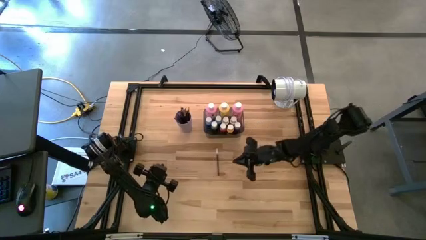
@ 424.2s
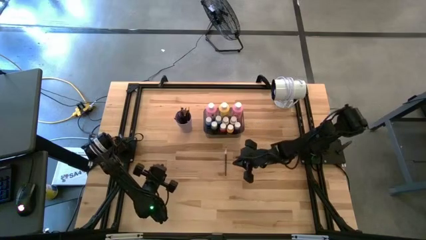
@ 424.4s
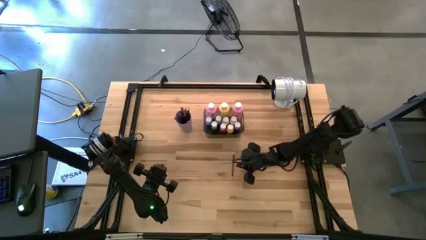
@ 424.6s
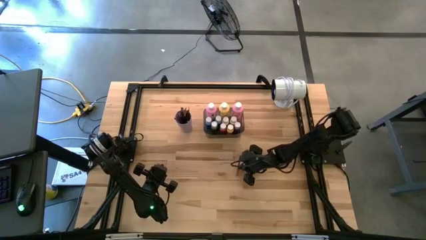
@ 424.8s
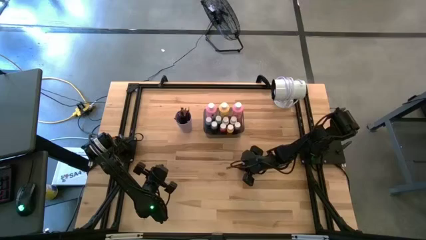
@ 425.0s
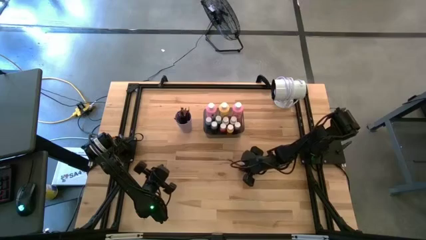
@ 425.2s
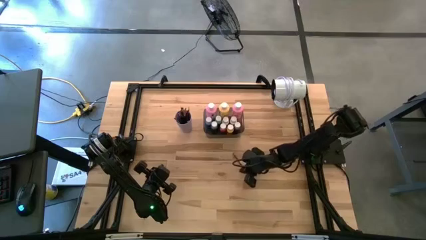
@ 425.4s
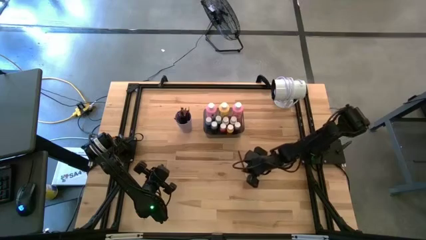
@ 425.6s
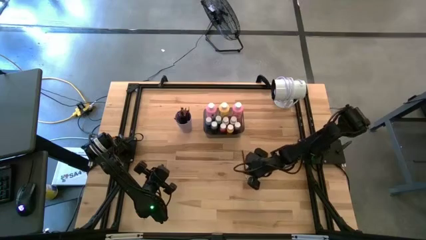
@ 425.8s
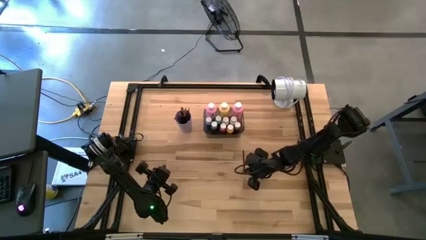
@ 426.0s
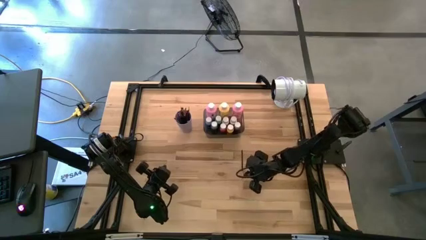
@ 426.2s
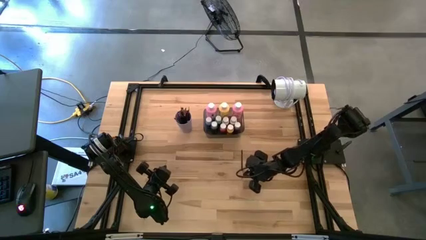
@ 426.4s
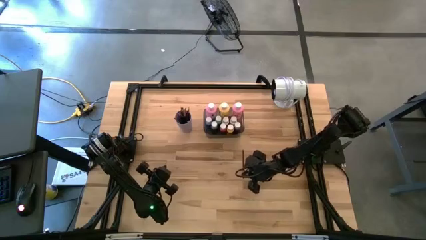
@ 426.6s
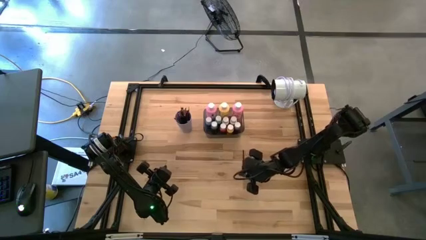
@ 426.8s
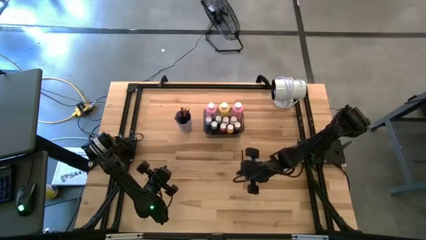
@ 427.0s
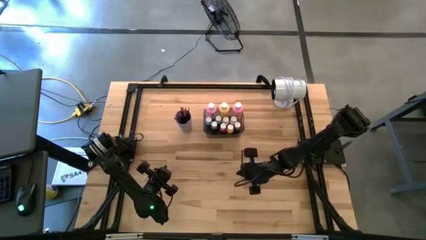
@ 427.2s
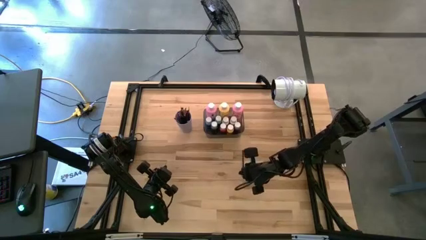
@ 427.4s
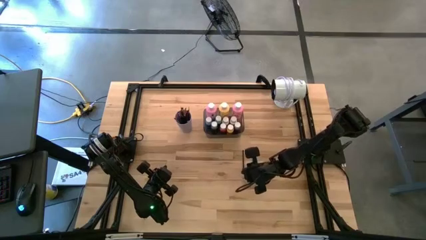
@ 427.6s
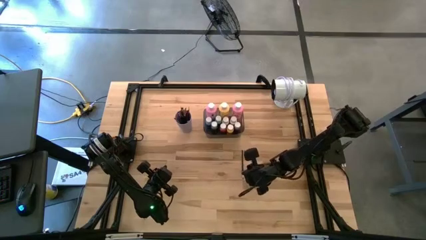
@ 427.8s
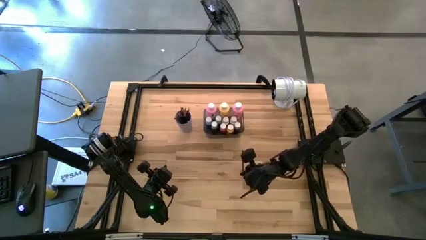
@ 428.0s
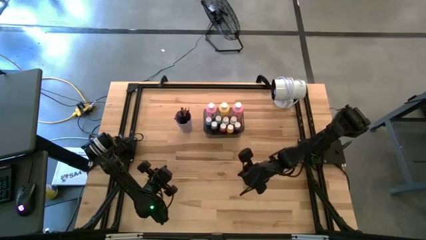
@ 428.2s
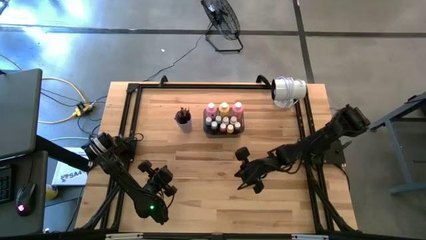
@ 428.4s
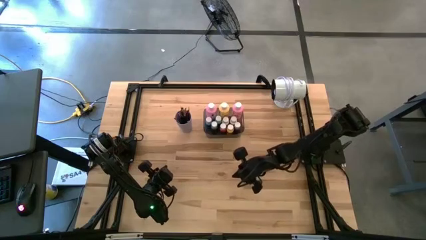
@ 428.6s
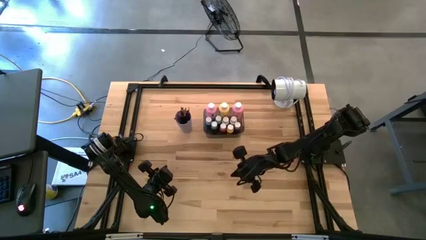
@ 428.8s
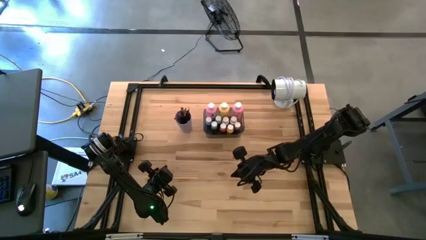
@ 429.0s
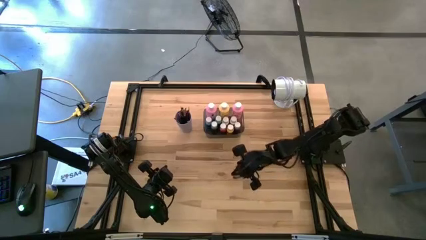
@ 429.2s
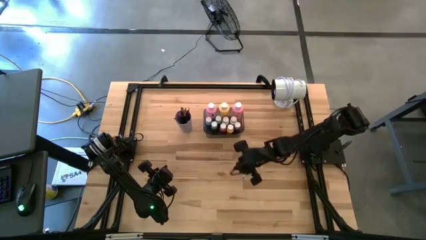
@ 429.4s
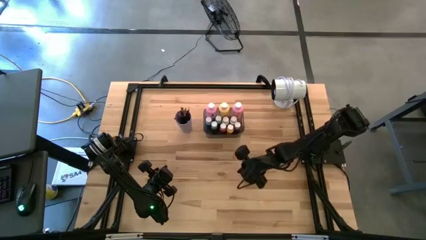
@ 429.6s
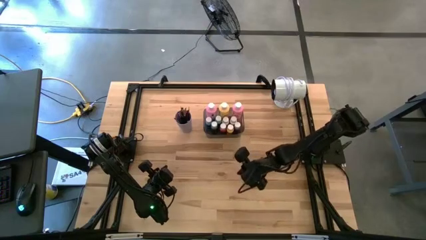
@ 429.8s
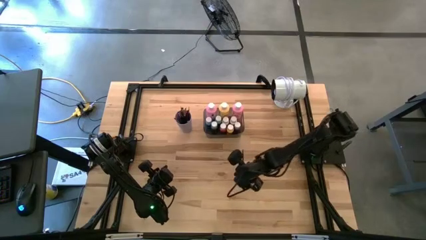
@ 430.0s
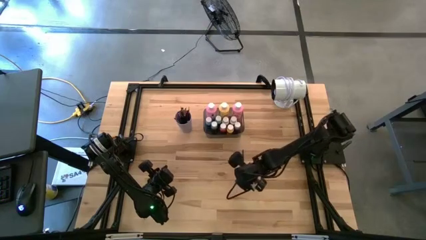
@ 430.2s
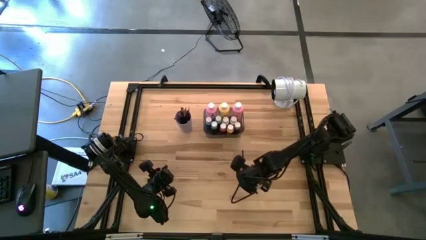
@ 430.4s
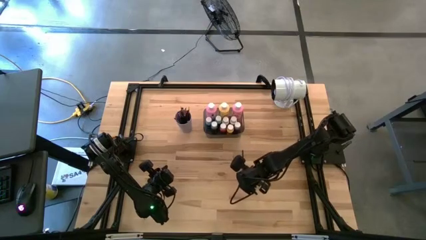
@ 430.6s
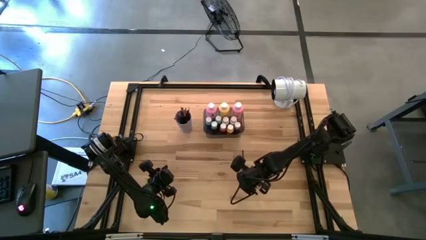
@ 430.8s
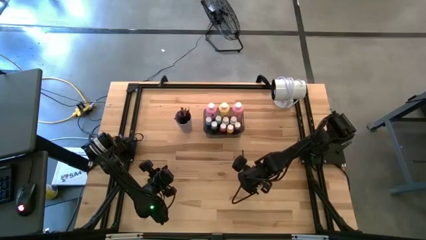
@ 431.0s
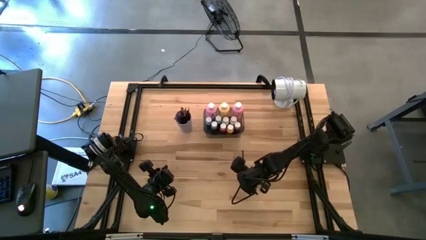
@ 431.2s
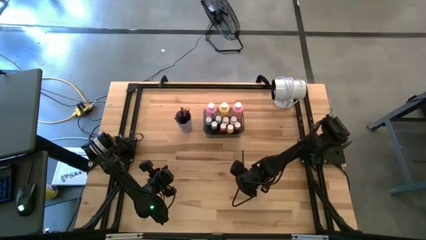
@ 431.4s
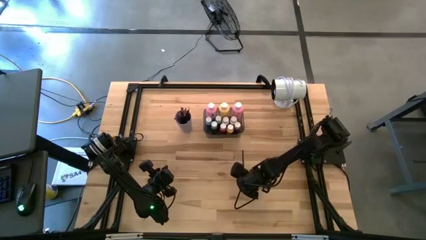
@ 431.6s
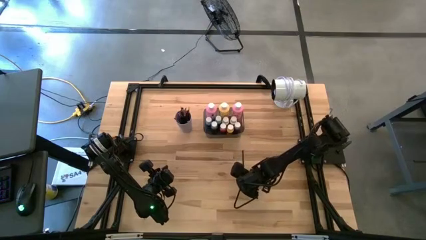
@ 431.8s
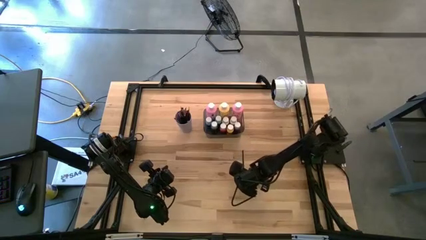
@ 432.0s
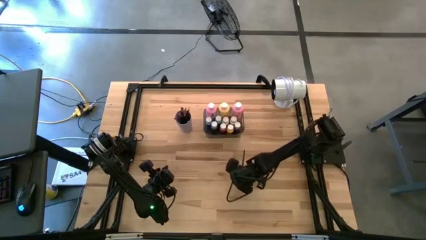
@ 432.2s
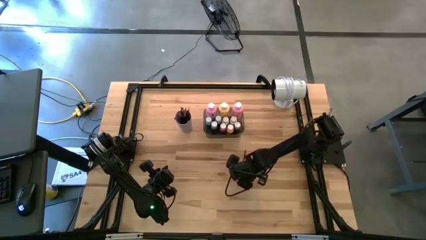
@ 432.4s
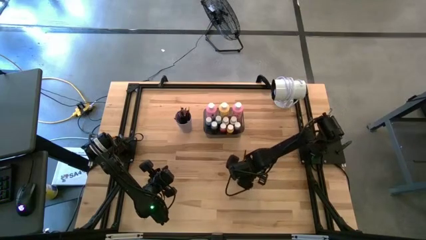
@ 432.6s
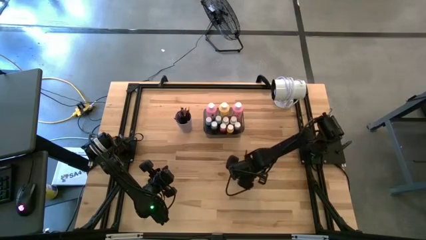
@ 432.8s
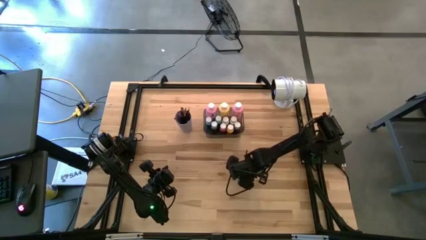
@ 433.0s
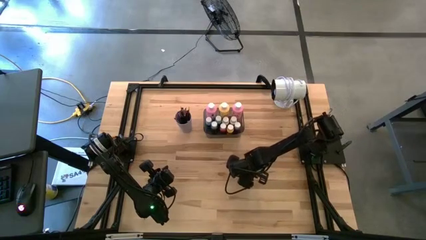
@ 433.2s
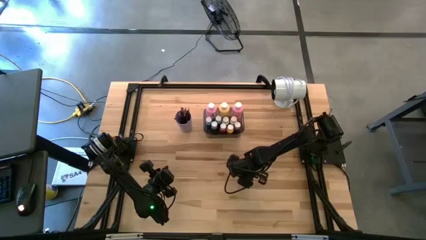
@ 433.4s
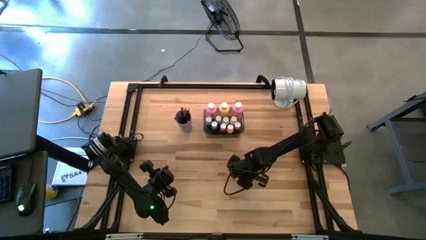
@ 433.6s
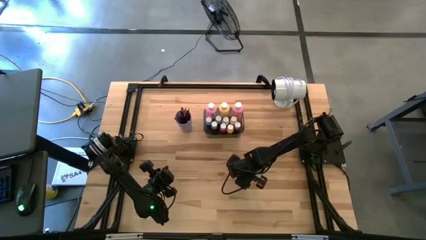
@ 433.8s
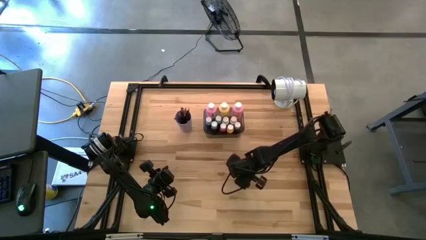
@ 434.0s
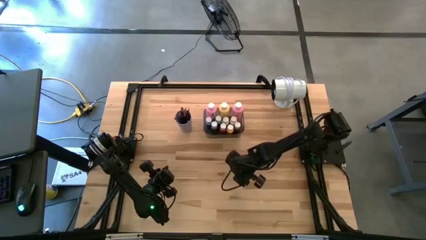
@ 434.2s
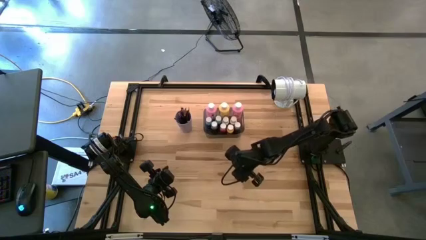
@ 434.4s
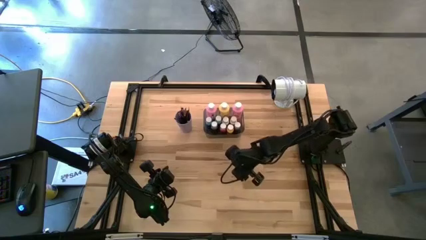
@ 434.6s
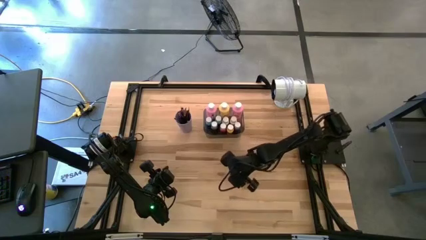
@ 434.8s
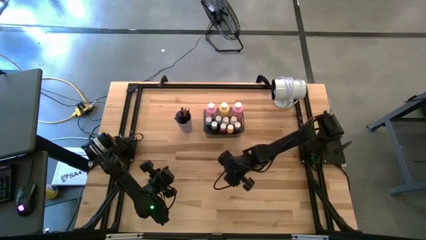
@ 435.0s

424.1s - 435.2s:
Task: Pick & Place Paint Supplies
Put the silver paint brush into the purple cup

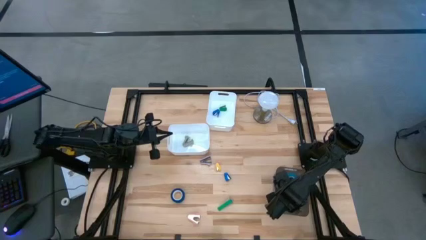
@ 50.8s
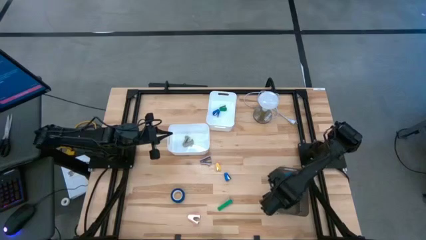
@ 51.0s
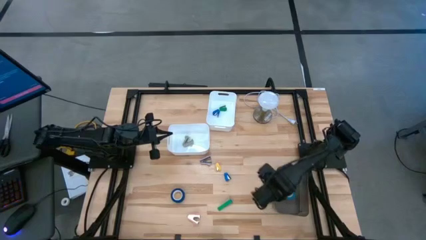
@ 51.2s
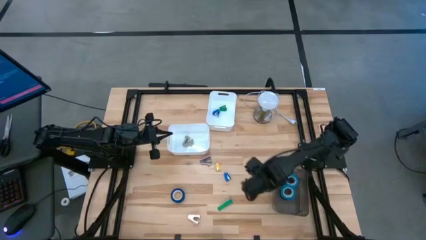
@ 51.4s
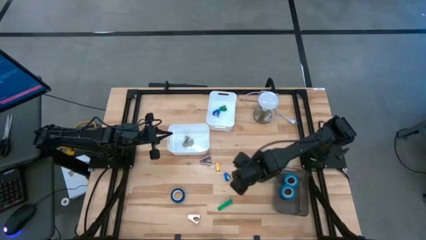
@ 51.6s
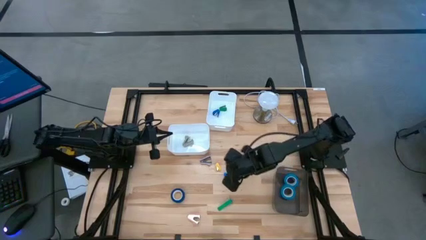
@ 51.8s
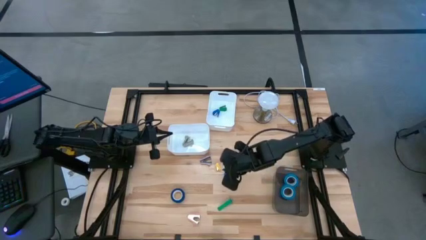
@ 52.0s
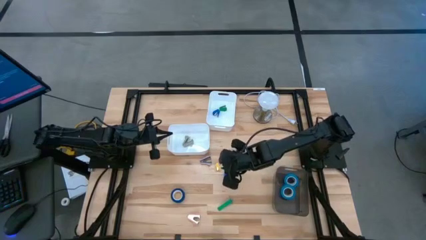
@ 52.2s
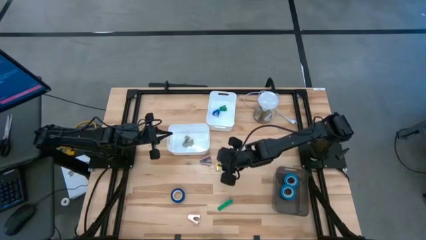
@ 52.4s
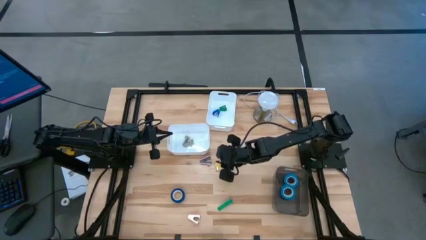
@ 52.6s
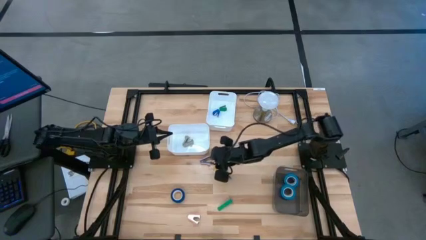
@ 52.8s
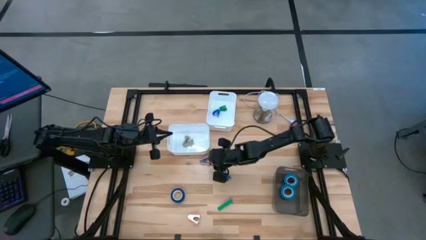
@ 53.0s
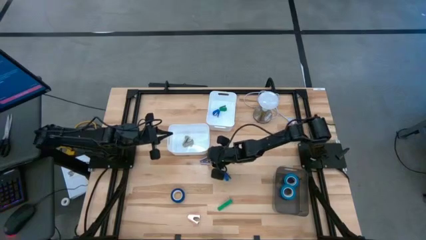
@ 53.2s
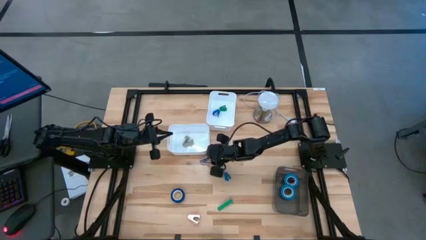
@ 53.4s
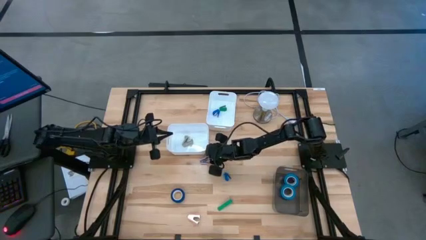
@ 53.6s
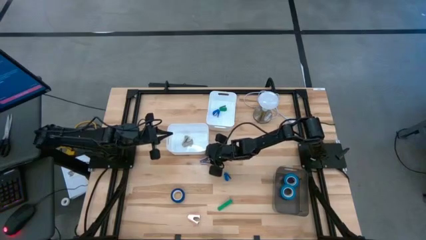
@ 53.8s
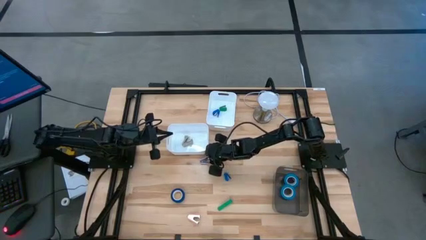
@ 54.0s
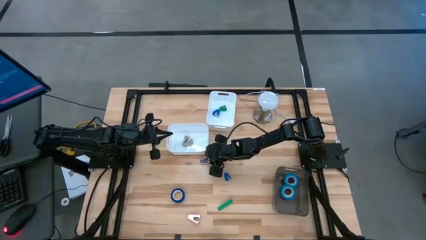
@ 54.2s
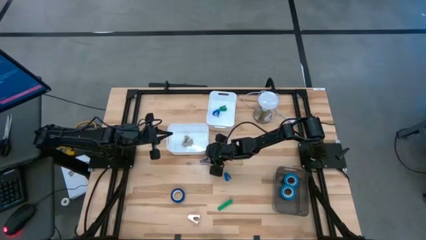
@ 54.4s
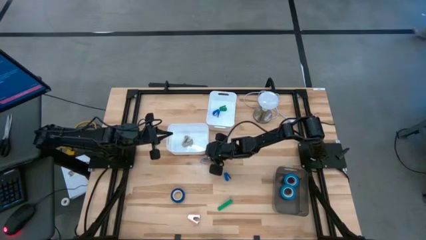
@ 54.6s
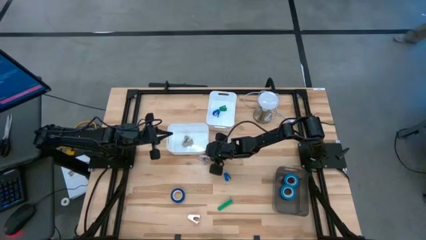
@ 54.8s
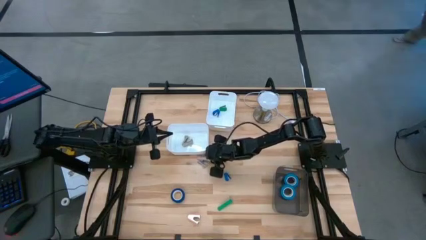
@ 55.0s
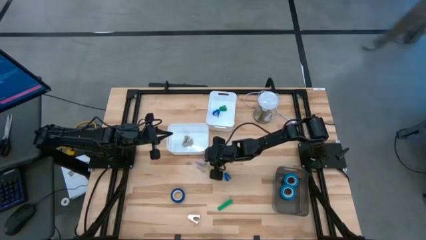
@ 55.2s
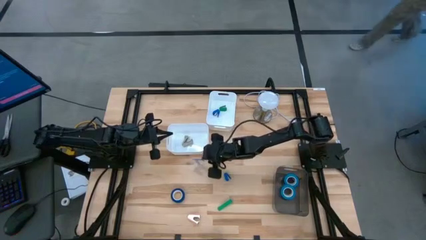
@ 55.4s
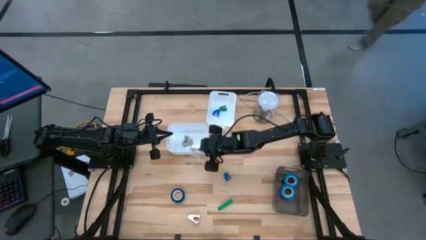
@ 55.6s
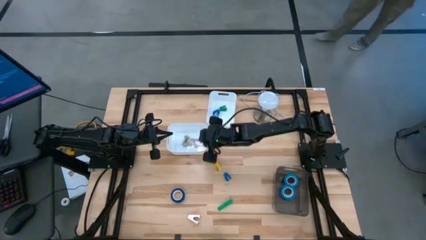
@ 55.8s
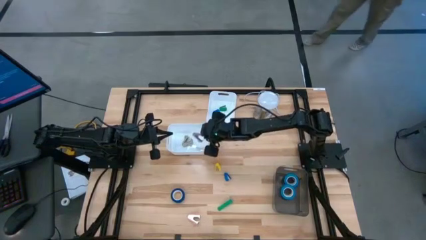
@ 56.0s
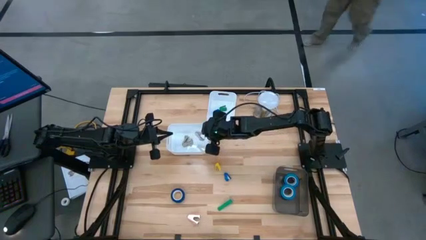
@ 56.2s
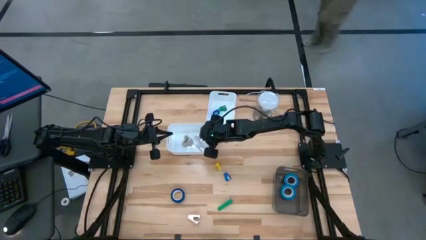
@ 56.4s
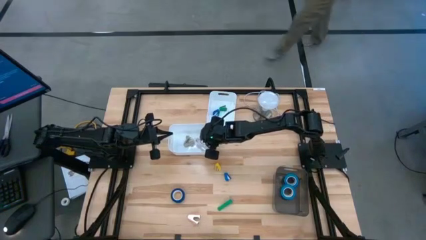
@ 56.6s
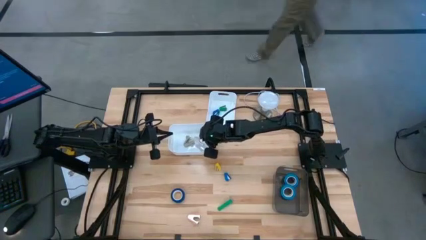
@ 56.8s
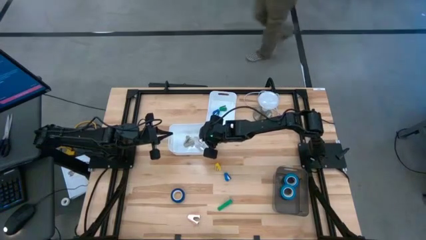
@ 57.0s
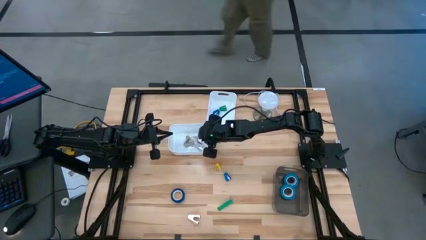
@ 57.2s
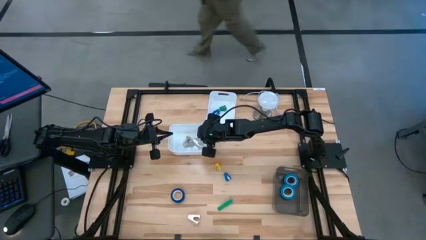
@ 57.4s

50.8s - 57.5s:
Task: Pick and place Stapler, Stapler remover, tape
Put the purple staple remover into the bottom white bin

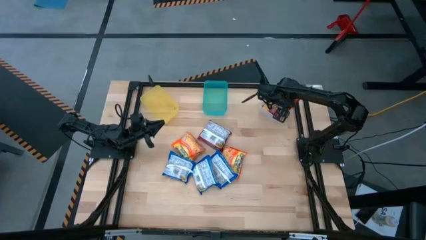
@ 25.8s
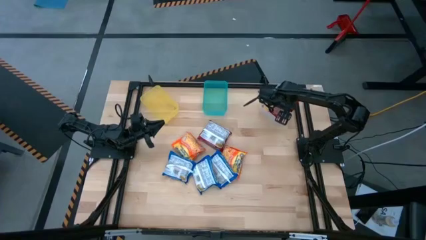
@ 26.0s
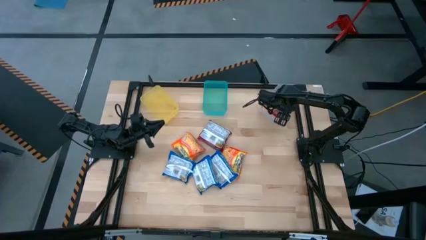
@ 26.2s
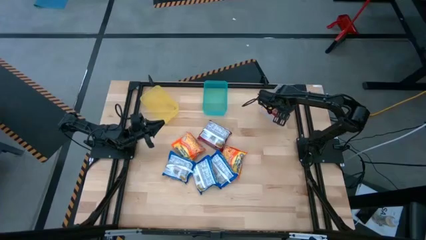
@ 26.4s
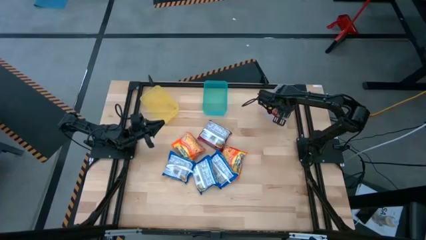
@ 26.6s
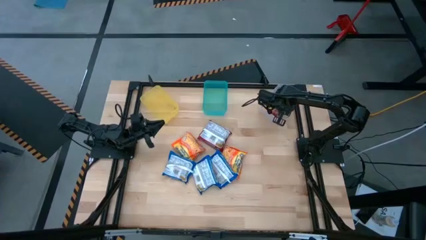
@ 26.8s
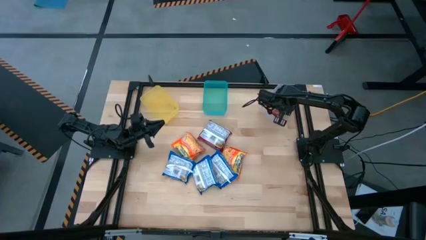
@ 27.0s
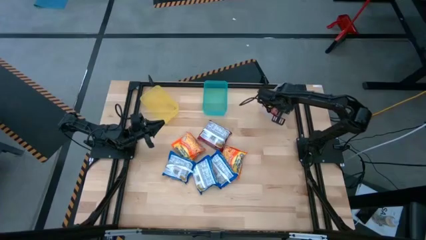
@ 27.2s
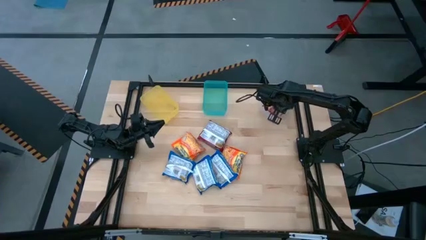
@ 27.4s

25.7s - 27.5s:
Task: Sort Maruchan noodles
Put the right red noodle pack into the transparent bin
